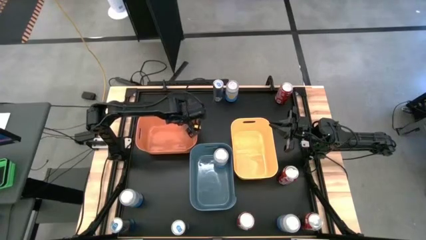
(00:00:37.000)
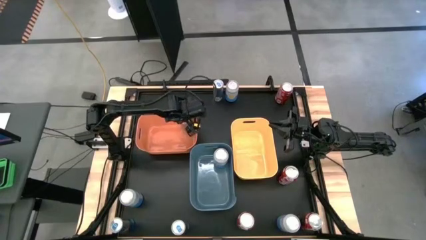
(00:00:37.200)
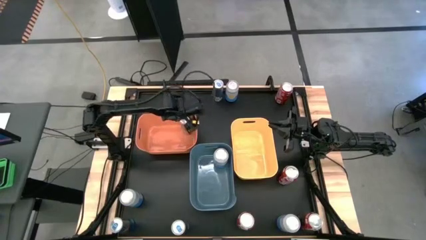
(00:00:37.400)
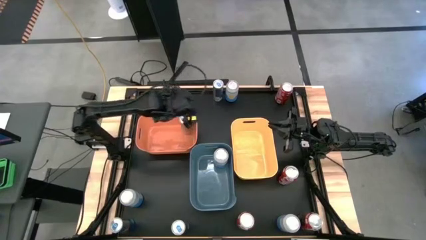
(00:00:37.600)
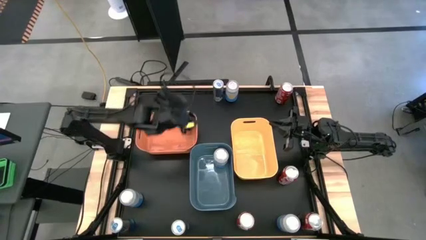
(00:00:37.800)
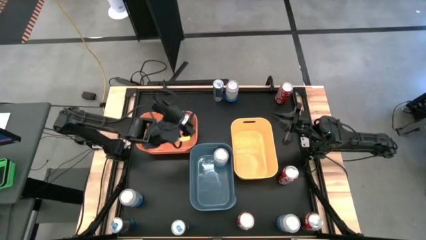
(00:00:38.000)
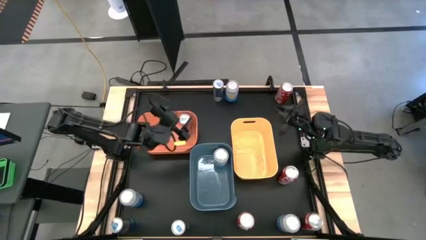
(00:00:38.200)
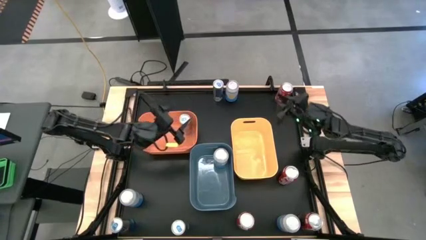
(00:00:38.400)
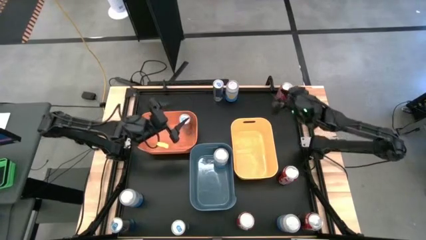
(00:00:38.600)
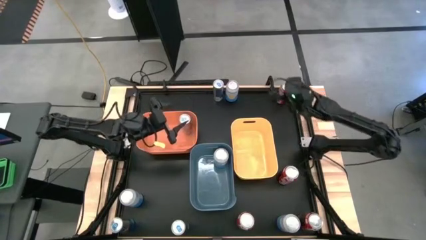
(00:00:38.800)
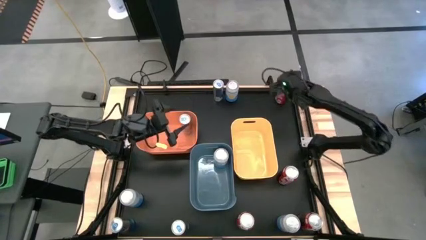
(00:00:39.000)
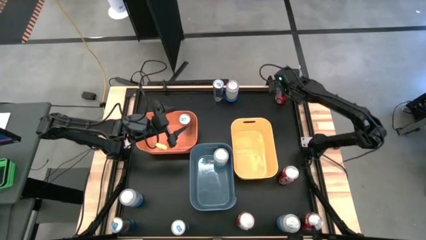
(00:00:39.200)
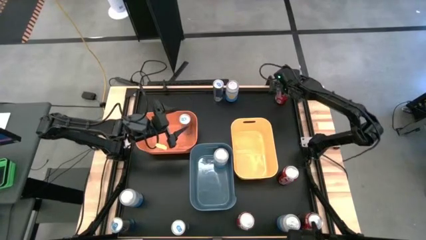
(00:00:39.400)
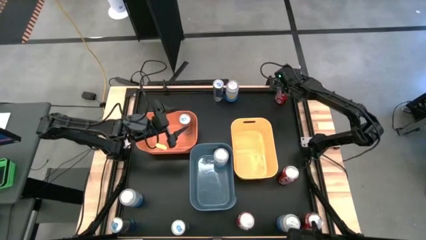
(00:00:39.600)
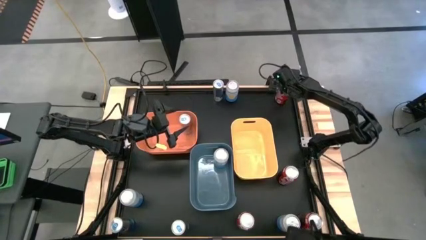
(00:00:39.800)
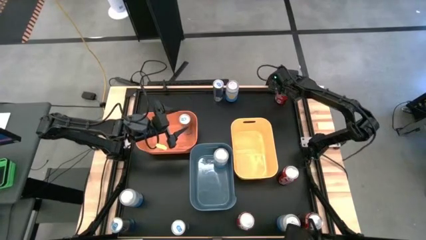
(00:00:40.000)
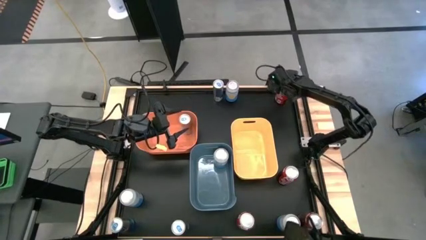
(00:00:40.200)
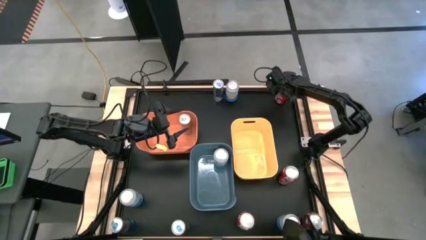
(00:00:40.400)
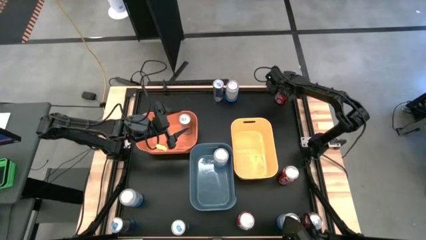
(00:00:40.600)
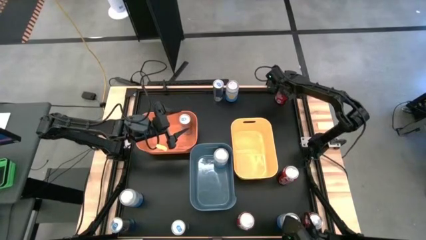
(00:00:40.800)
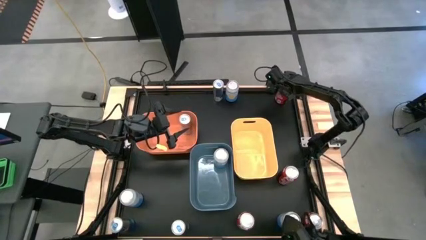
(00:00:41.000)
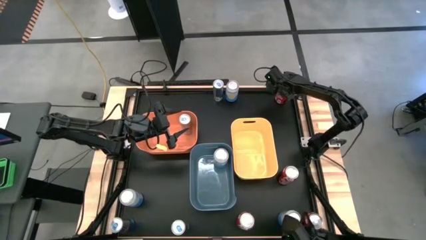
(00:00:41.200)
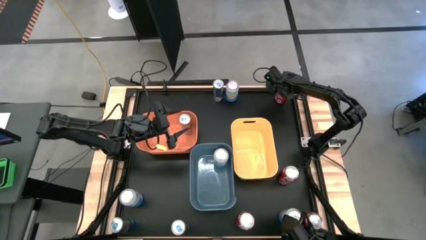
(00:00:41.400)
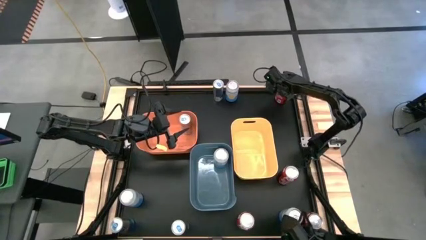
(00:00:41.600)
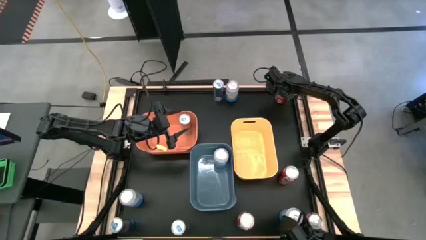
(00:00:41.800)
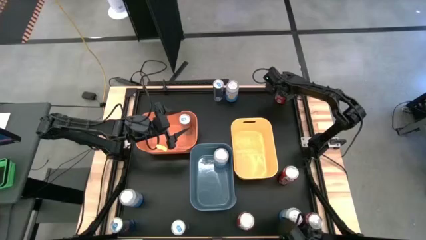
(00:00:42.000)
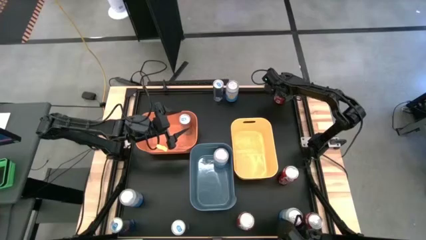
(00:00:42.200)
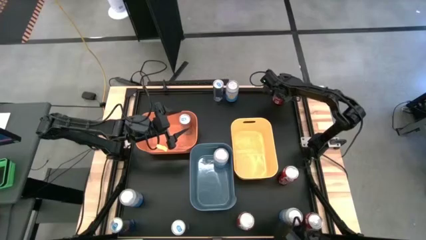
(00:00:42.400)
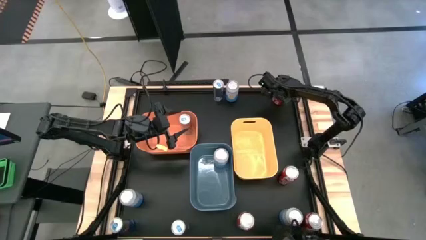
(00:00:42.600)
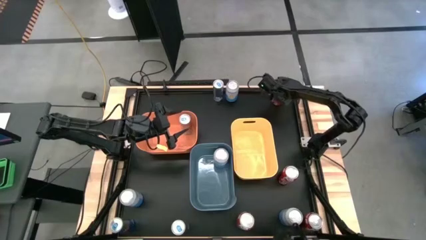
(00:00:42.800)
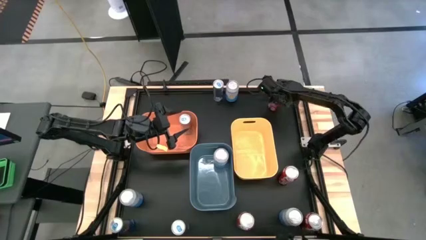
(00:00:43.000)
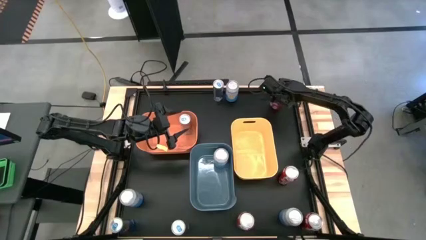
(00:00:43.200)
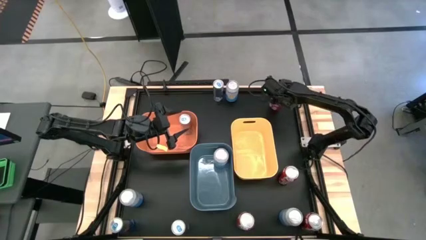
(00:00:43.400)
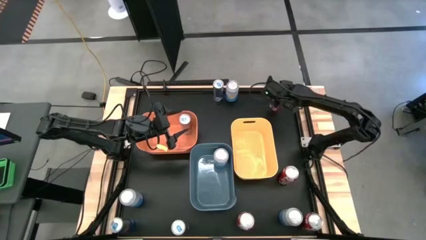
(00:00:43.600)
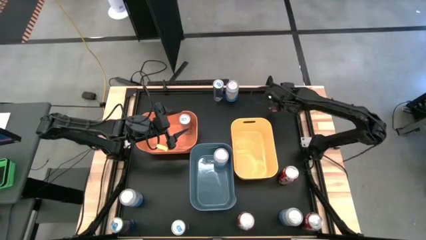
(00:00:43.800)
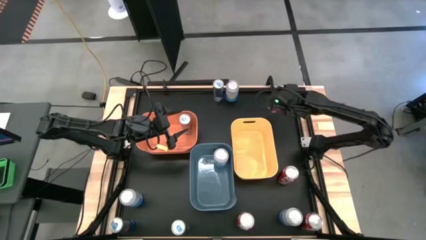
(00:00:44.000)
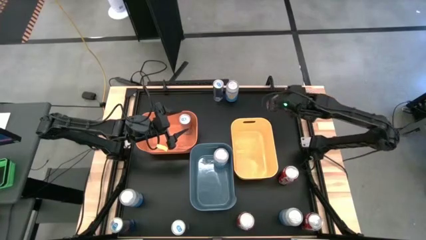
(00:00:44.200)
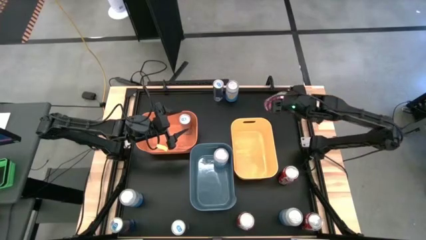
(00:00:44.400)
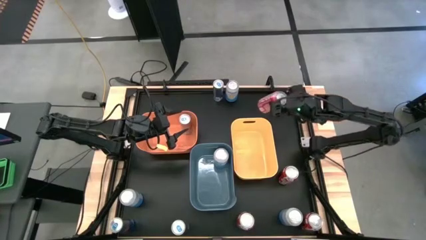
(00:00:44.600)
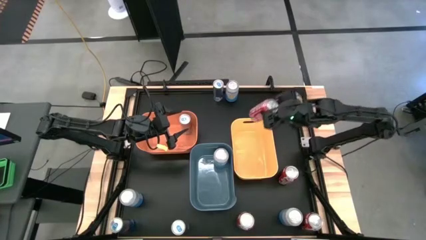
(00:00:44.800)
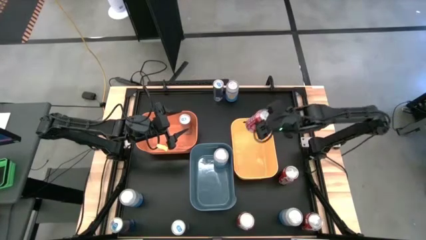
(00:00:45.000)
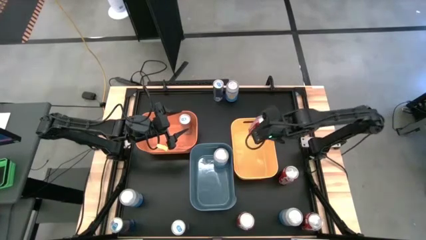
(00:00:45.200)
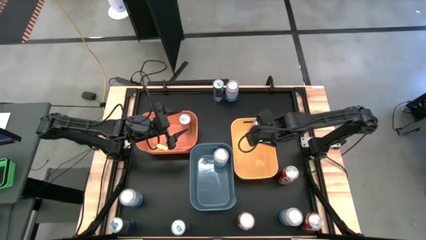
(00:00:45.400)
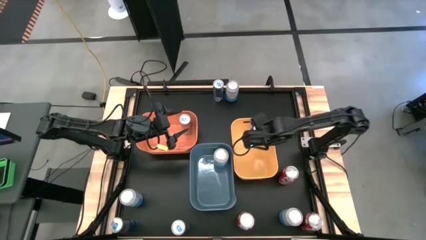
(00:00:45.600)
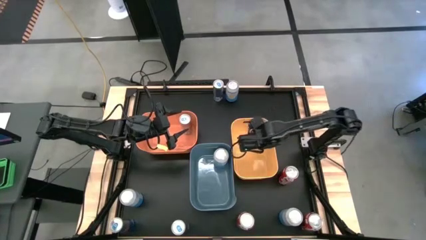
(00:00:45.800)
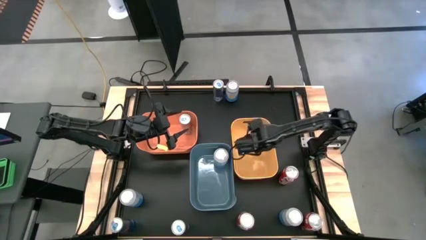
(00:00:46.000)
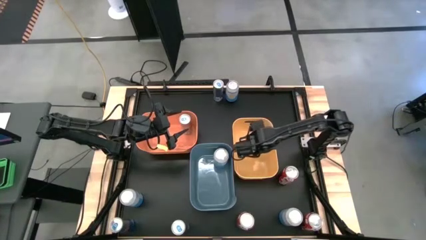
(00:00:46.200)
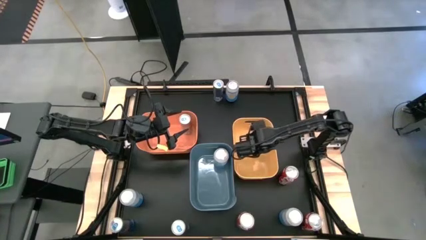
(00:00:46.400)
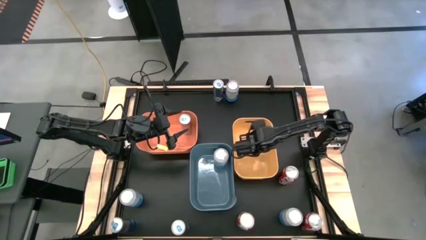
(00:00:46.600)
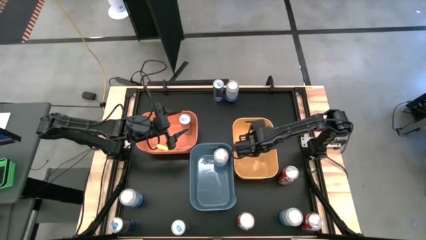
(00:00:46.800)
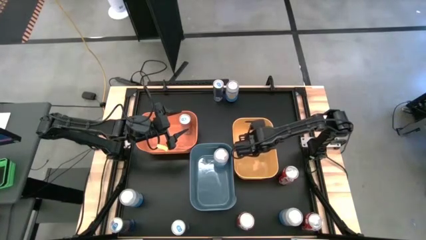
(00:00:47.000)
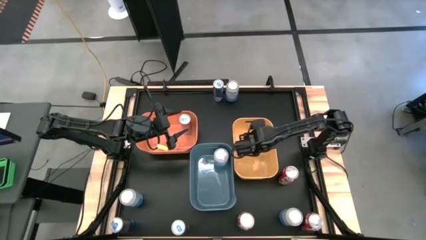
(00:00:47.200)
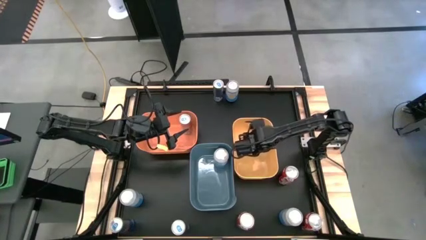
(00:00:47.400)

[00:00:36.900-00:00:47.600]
Task: Sort soda cans
Put the top red-white soda can into the yellow bin

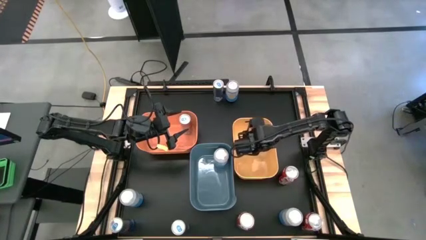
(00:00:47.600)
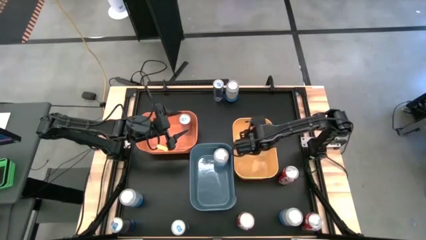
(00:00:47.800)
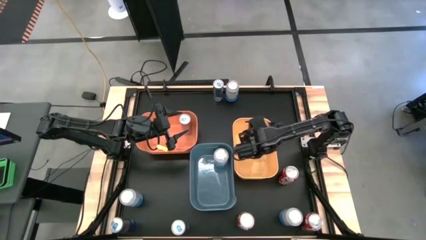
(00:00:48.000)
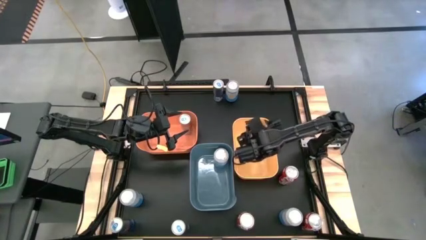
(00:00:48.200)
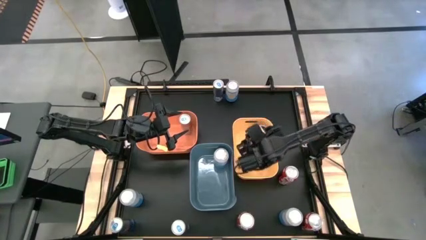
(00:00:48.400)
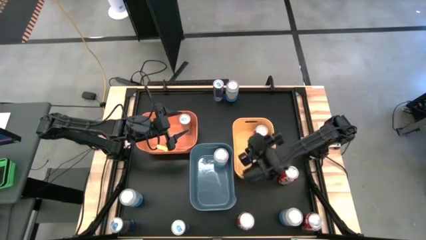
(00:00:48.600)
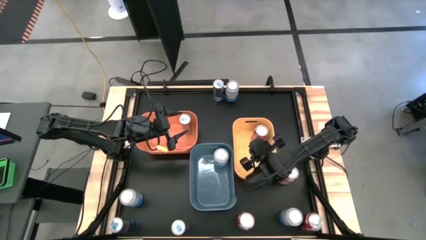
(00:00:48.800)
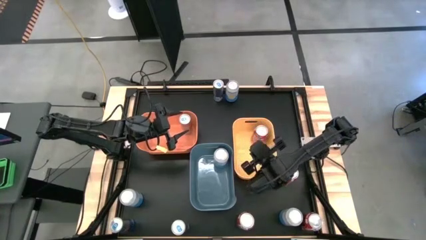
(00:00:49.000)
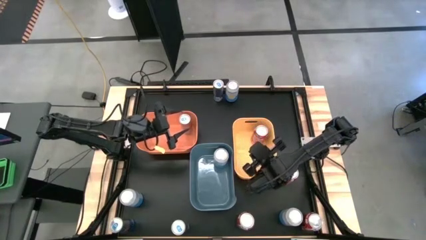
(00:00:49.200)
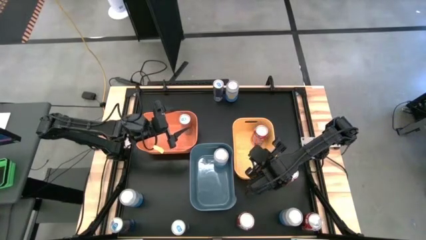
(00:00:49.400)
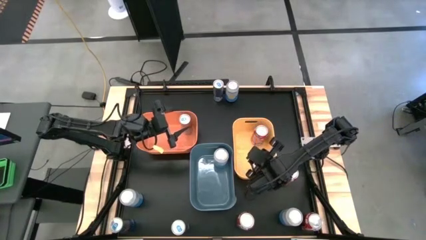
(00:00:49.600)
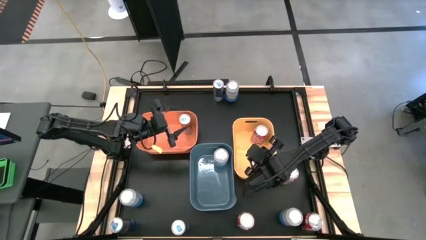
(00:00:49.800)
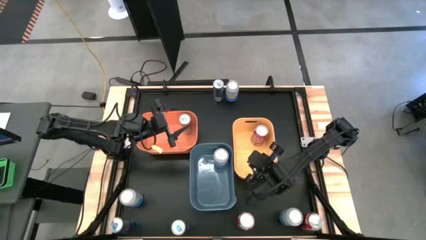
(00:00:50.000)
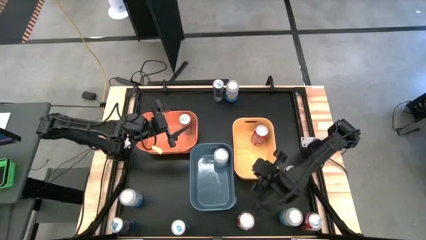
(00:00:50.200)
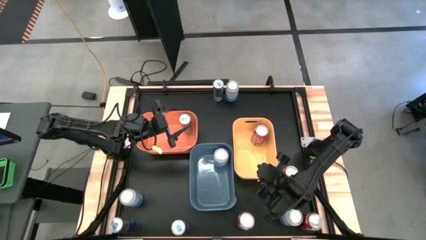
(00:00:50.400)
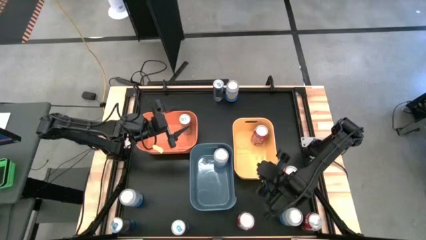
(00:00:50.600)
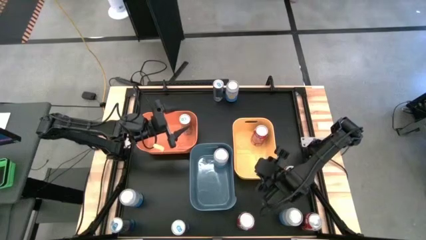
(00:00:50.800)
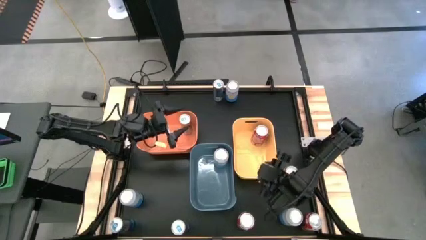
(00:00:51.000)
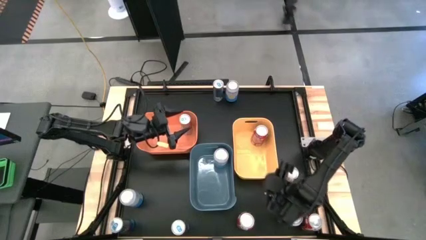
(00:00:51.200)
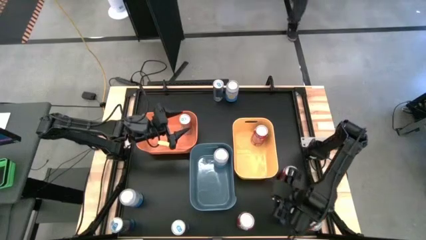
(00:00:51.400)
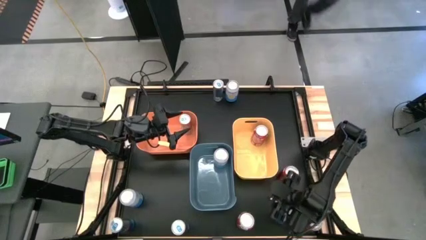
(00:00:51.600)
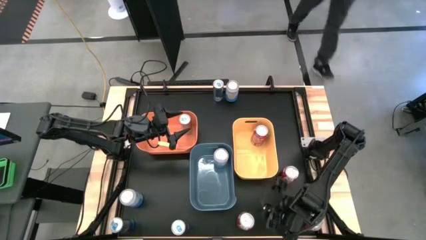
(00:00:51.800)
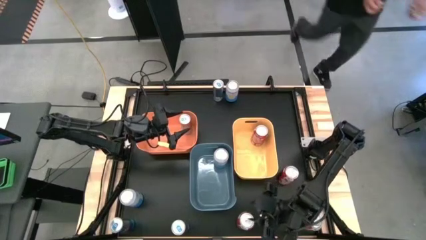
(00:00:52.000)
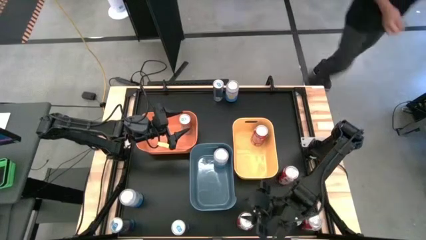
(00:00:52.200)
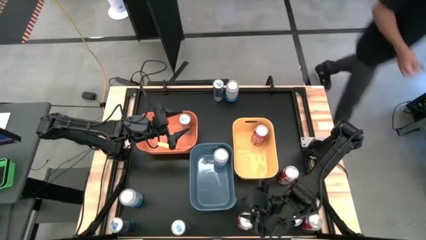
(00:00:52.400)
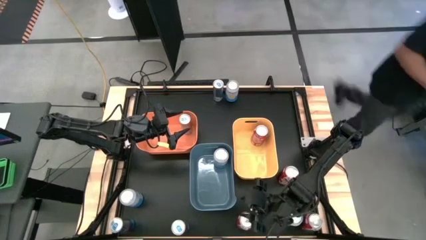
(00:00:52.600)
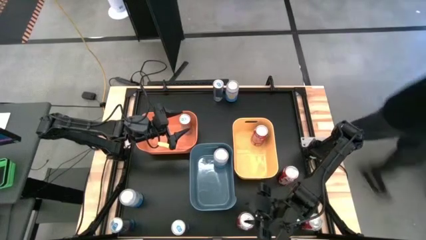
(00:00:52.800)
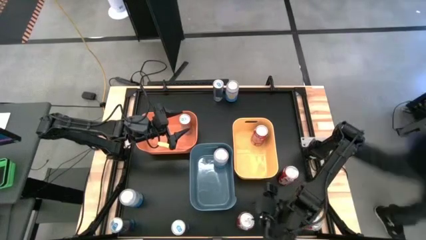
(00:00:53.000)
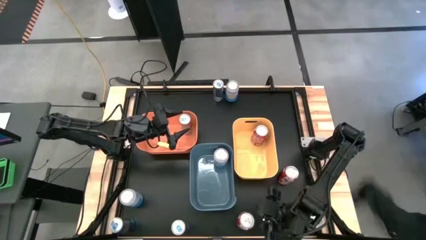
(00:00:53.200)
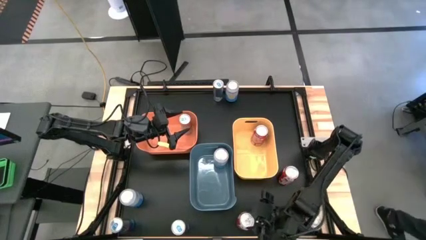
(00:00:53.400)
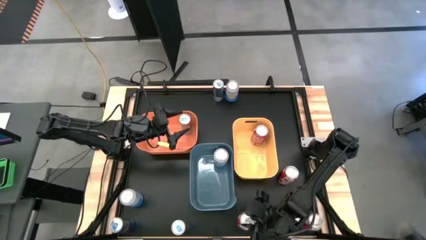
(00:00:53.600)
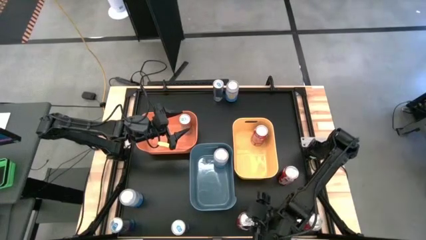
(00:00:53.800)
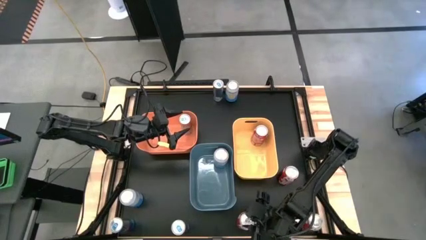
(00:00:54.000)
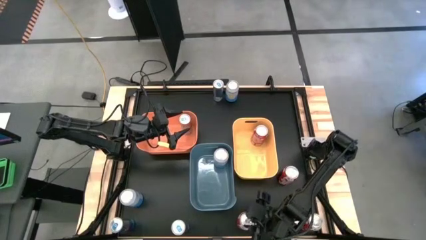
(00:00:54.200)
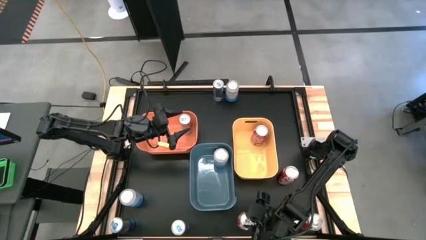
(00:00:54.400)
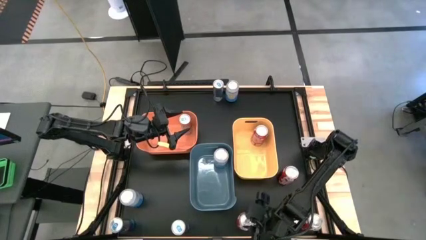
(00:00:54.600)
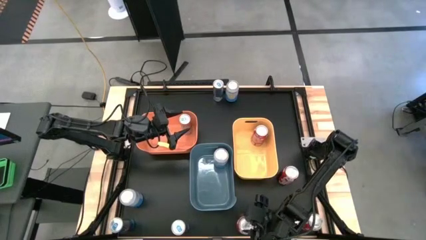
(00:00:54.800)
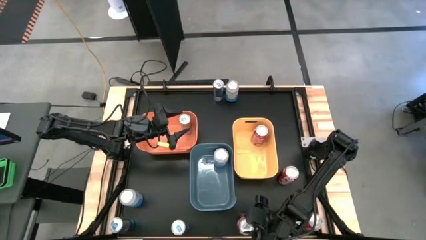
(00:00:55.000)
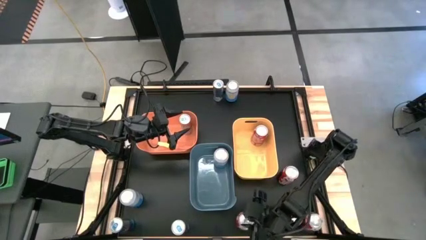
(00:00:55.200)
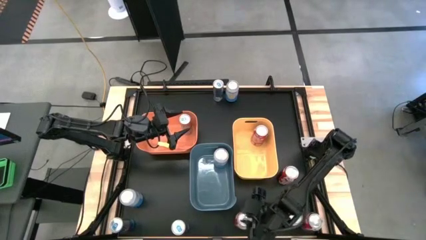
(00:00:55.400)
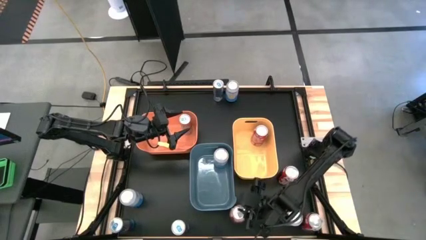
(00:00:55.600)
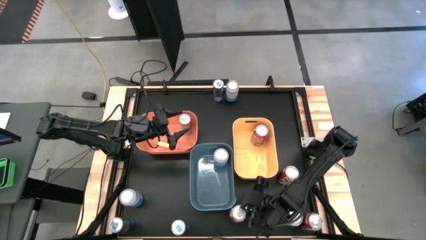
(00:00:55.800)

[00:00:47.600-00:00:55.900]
Adjust the bottom left red-white soda can on the table
